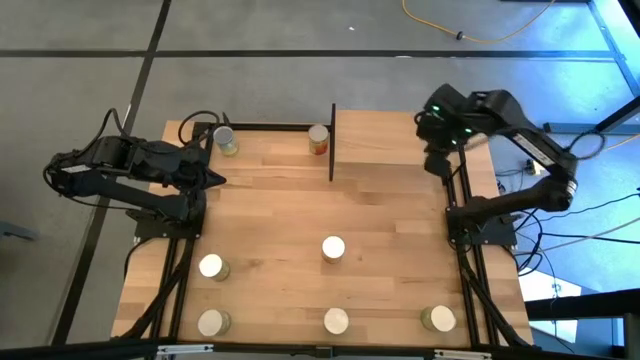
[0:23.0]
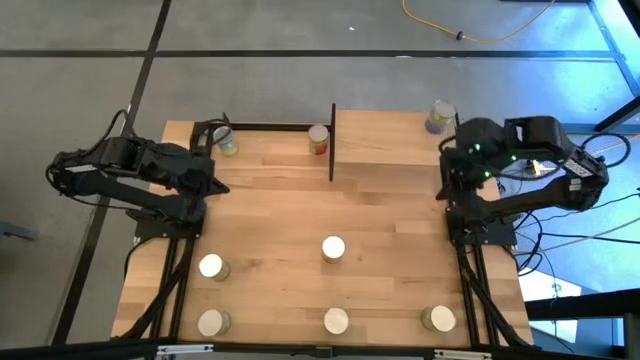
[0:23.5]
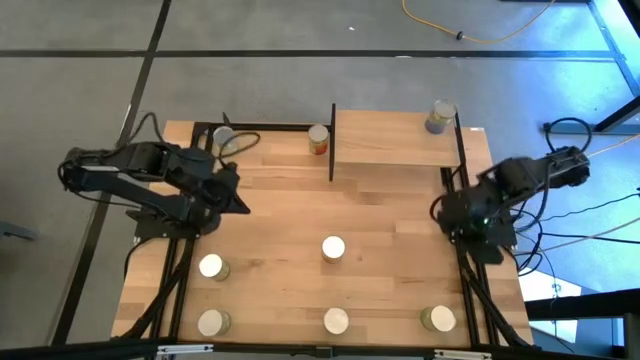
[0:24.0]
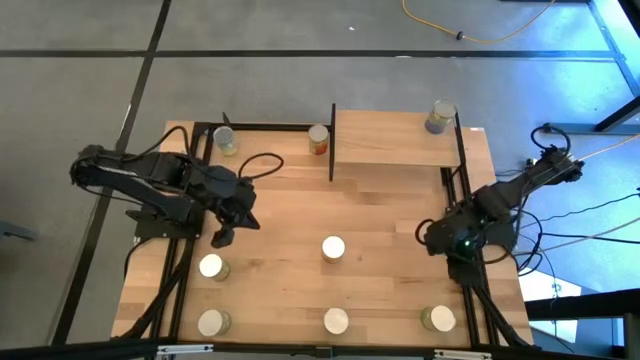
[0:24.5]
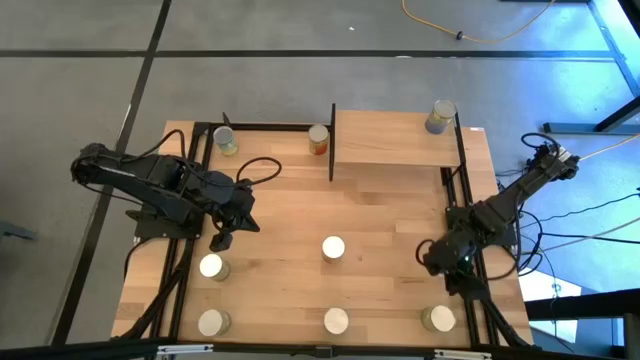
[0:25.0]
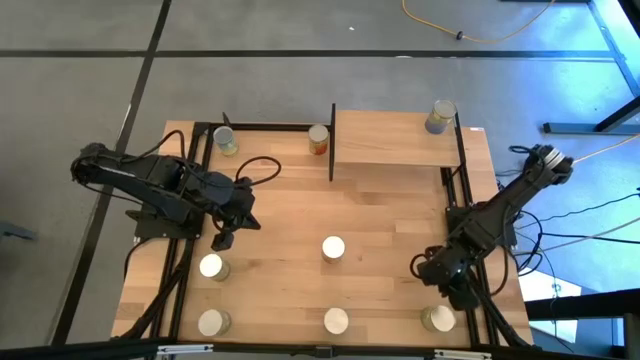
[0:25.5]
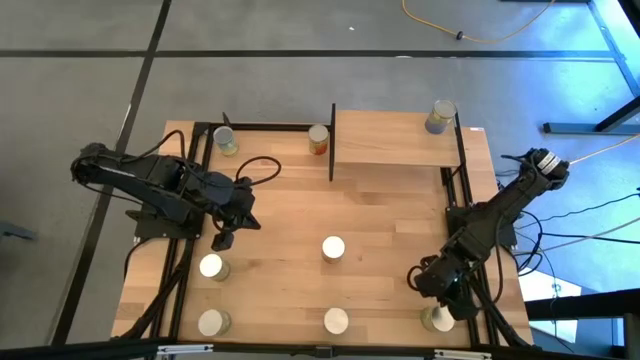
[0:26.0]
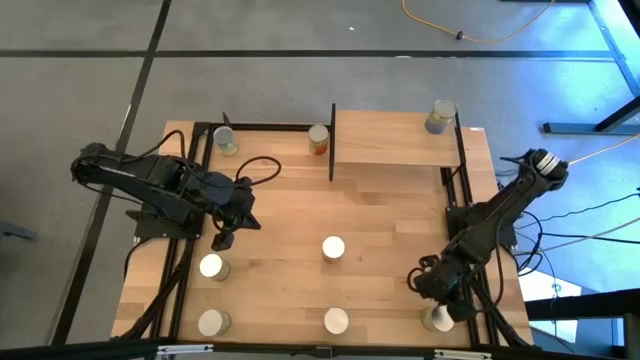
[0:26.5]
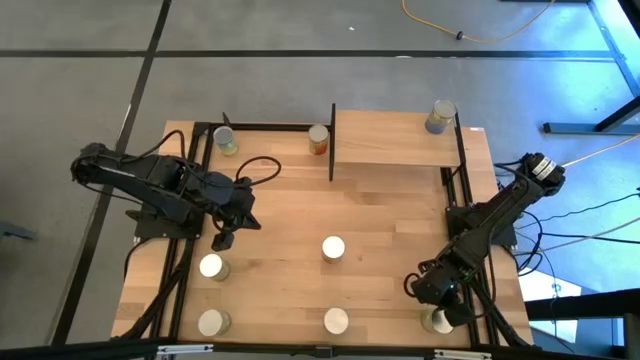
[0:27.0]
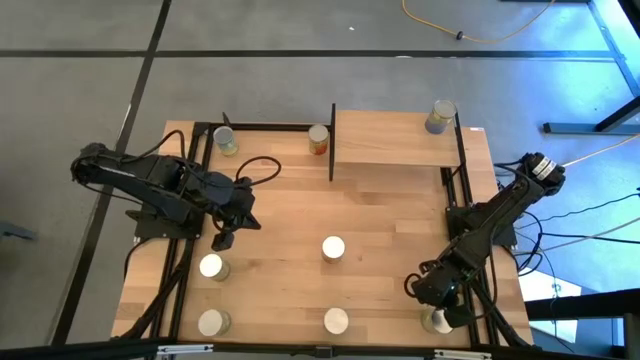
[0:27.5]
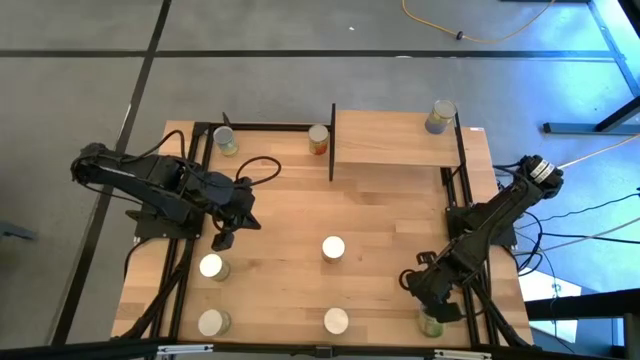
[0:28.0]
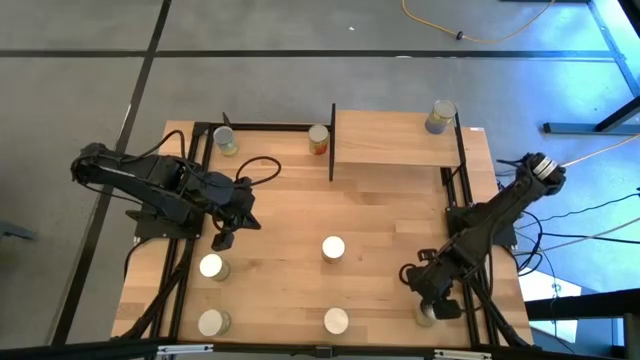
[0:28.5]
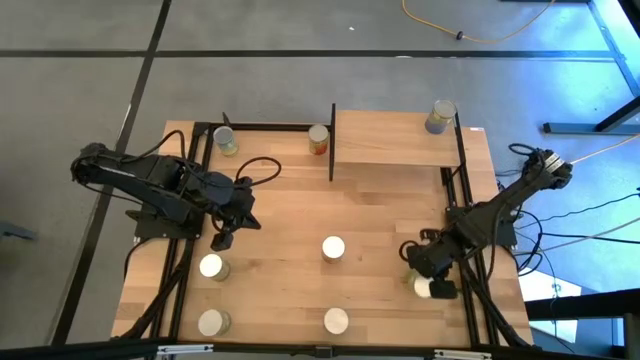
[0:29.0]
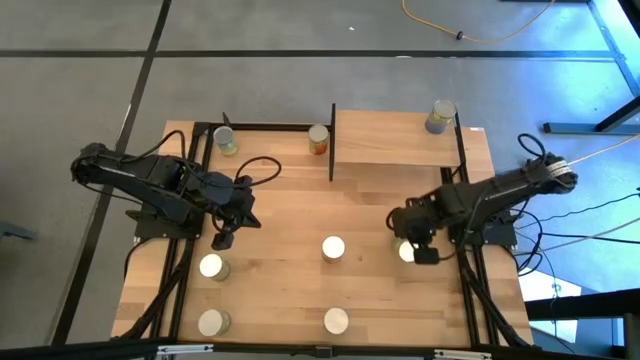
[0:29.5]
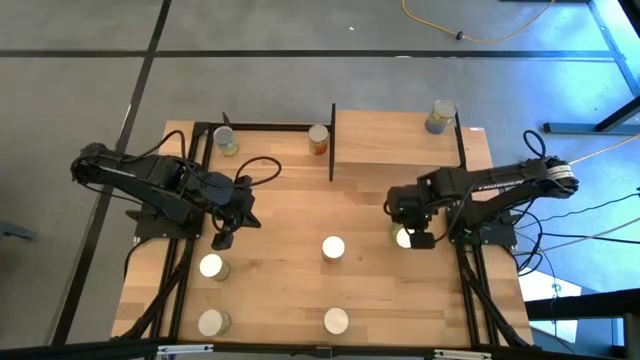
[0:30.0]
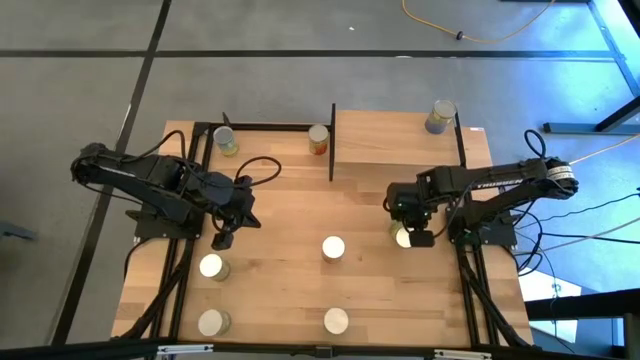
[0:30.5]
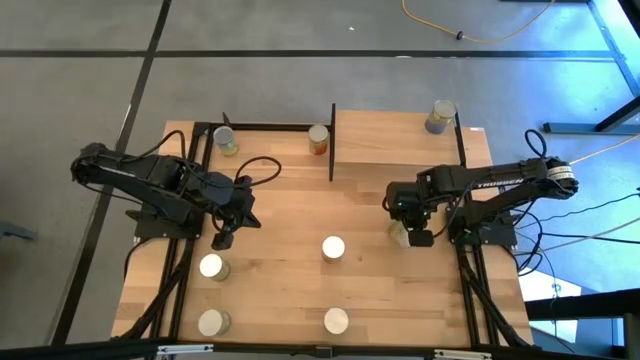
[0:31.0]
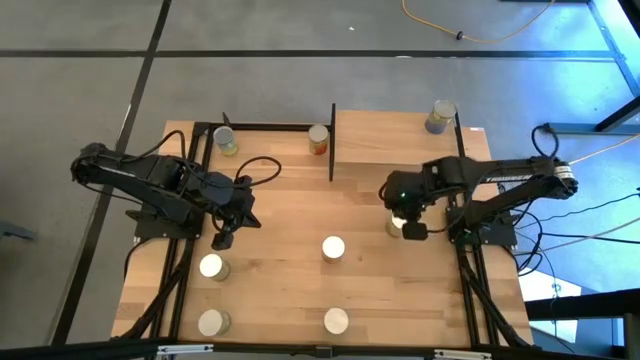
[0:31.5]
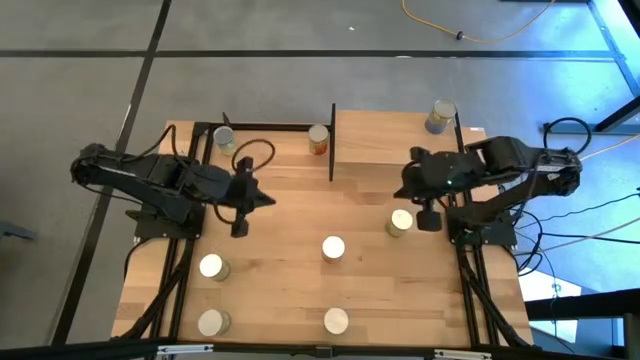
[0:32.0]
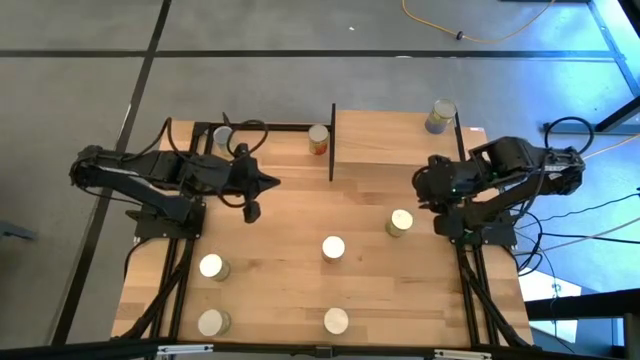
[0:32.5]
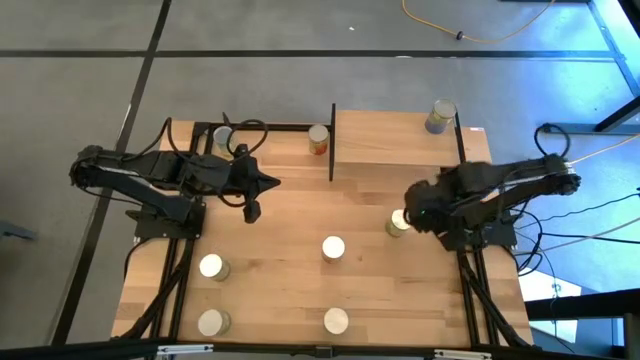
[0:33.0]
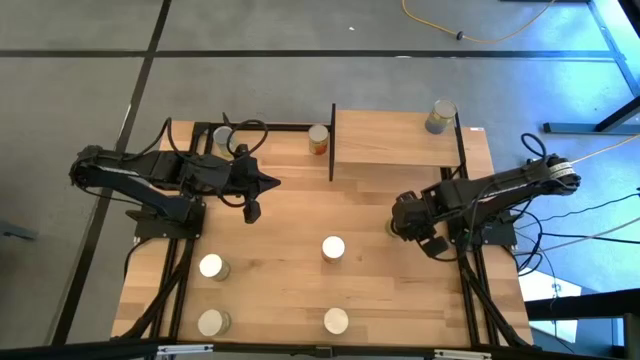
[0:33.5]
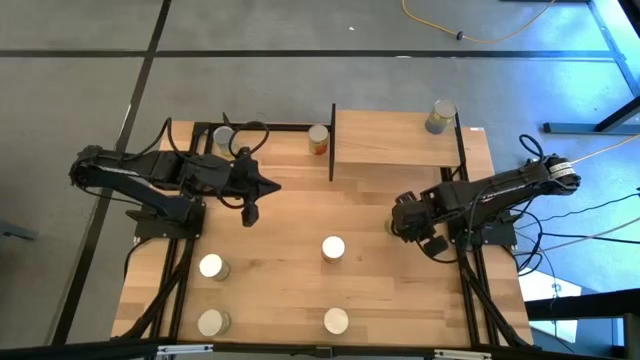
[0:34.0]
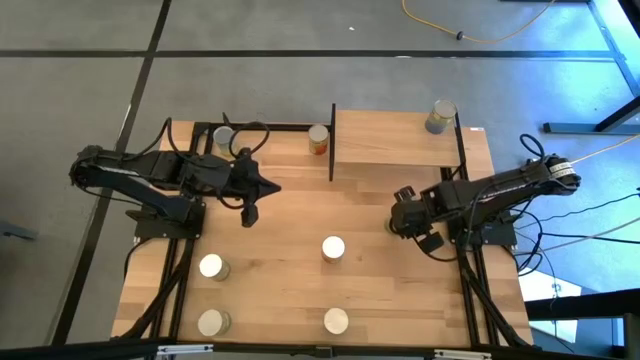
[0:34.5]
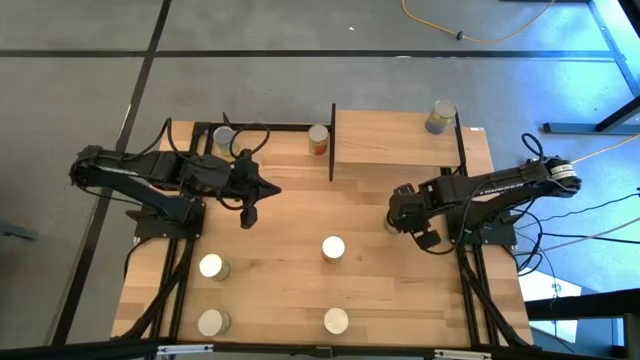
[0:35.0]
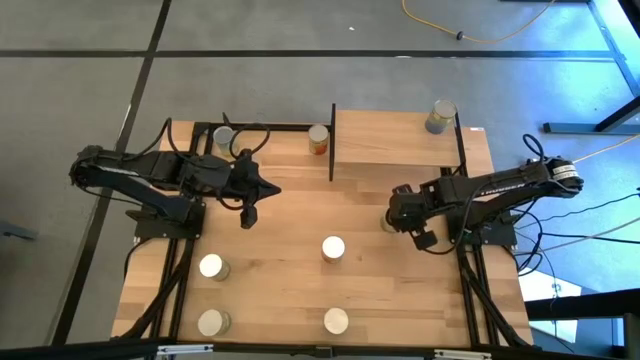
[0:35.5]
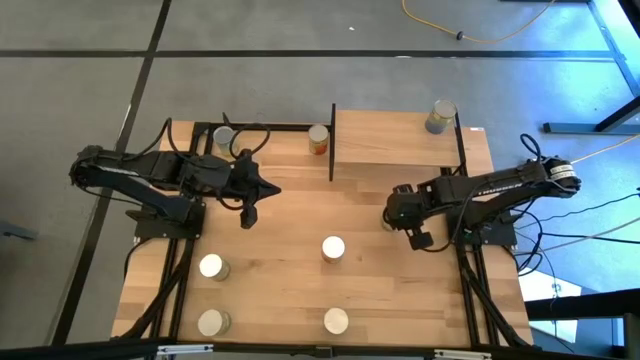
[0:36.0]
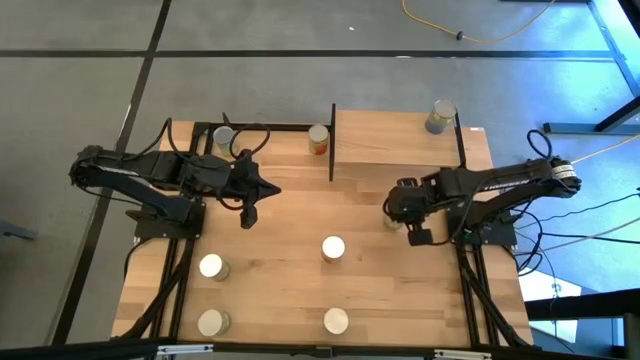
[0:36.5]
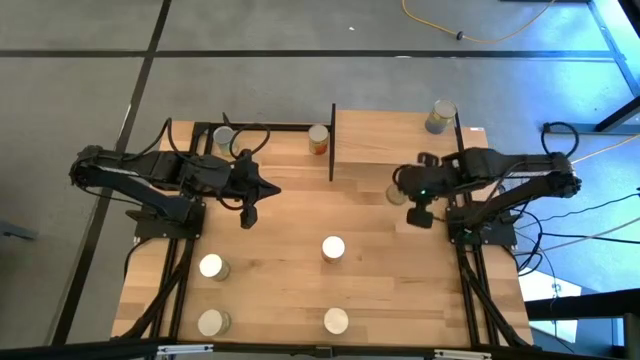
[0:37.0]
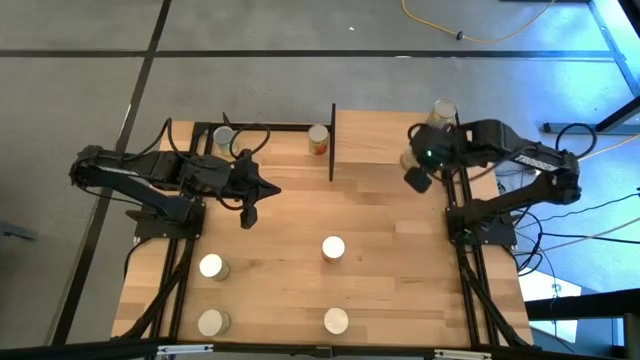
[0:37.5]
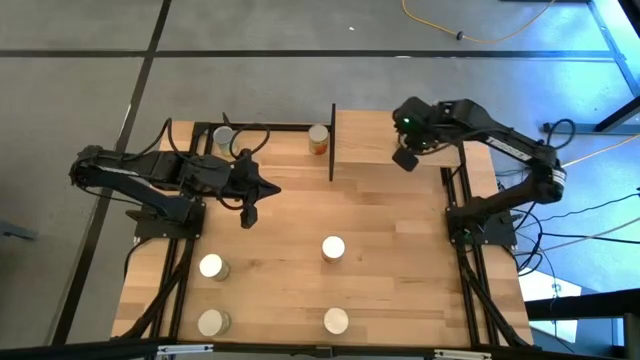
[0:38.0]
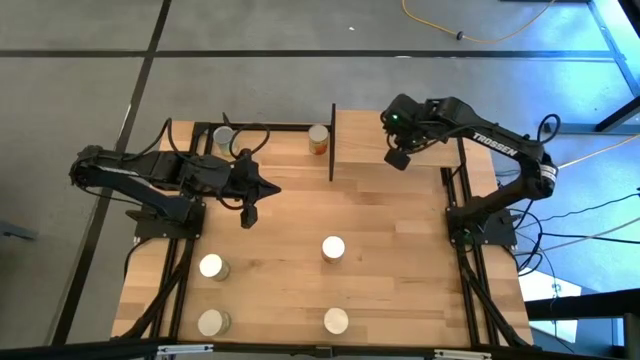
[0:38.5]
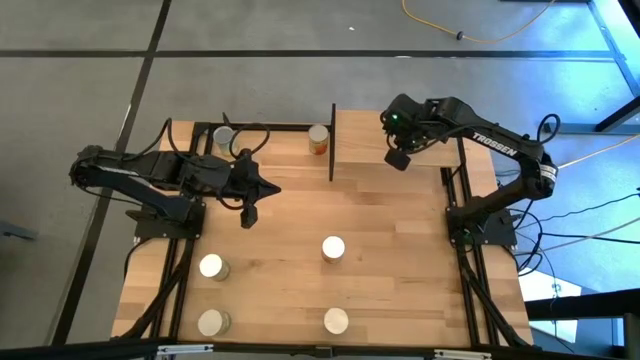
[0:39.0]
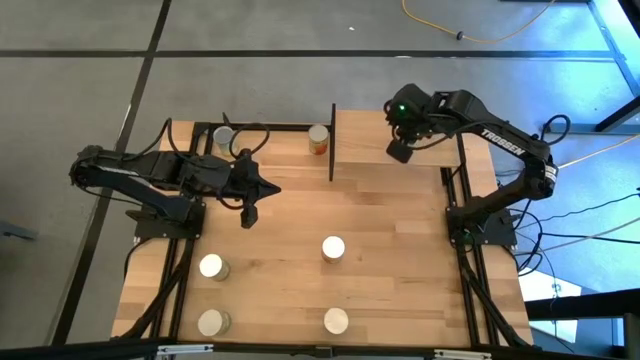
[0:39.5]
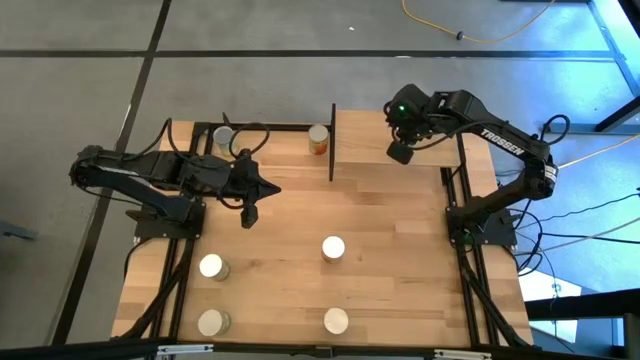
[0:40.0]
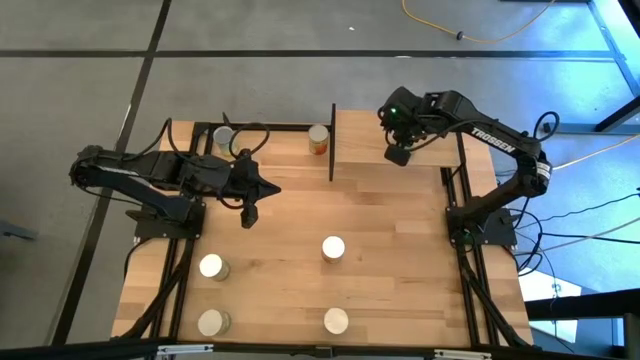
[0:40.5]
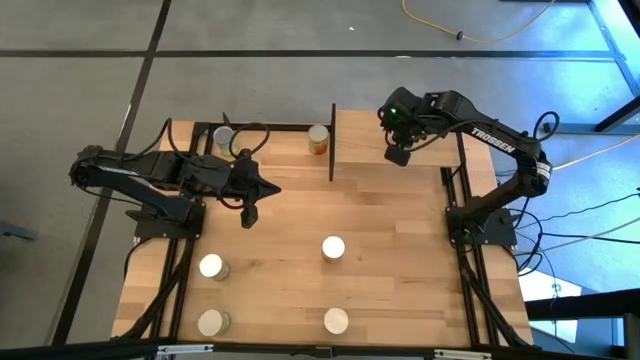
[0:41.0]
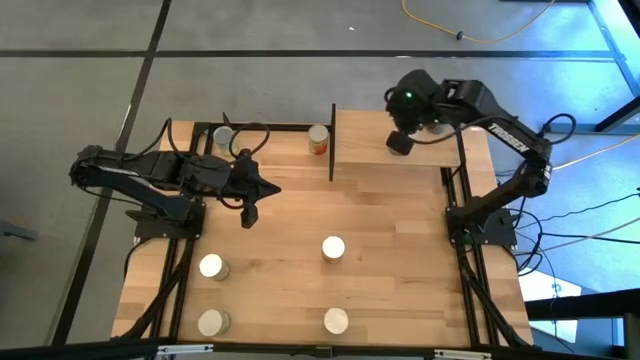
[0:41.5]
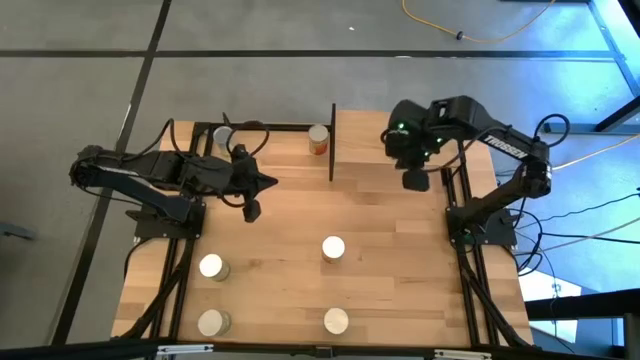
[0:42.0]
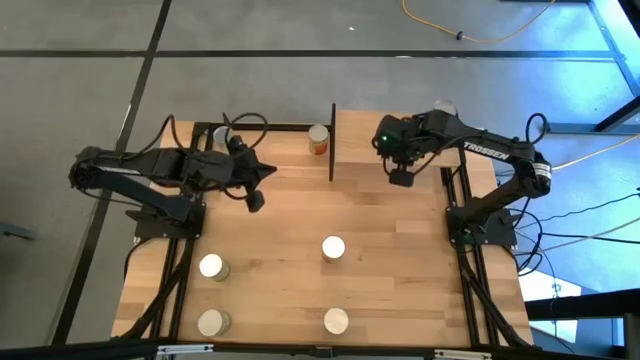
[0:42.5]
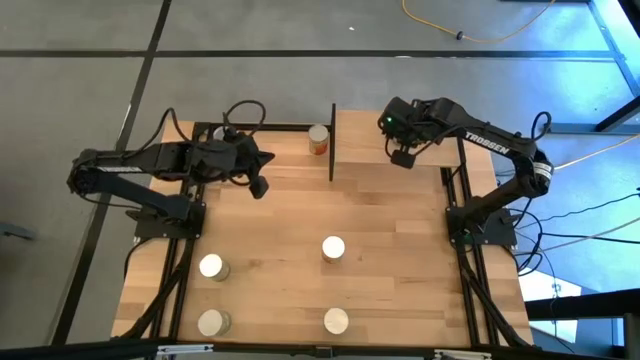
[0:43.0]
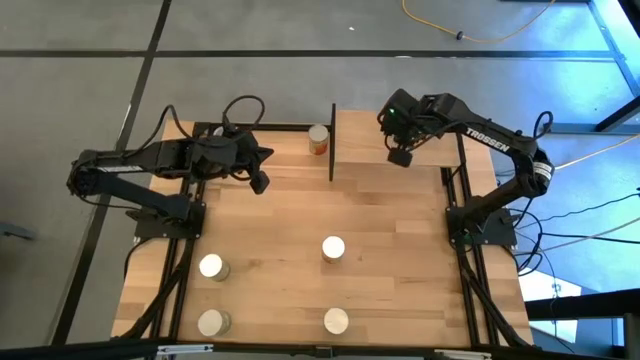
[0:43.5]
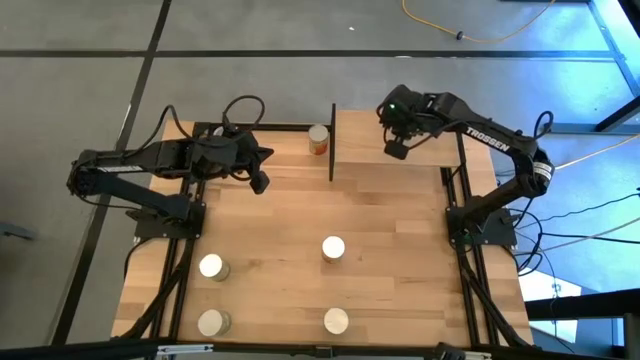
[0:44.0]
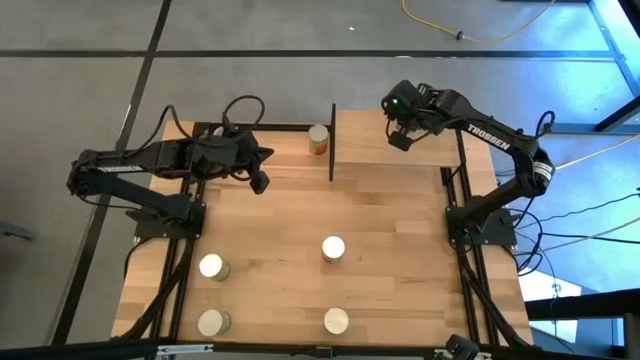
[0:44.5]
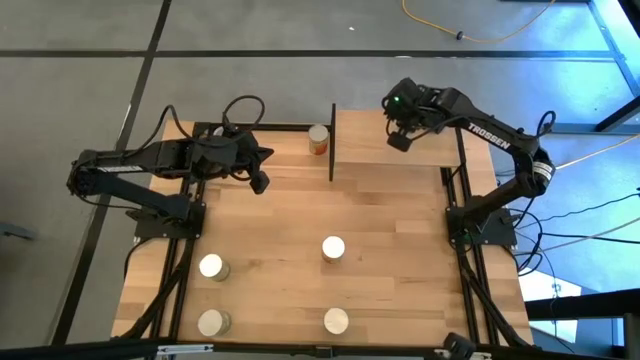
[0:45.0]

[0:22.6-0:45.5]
Task: Pick and place cans onto a shelf
Put the bottom canned oranges on the shelf
